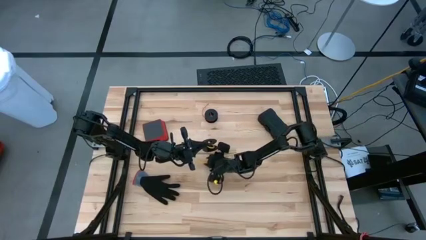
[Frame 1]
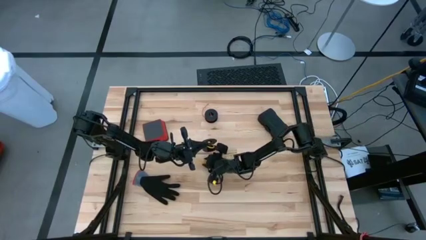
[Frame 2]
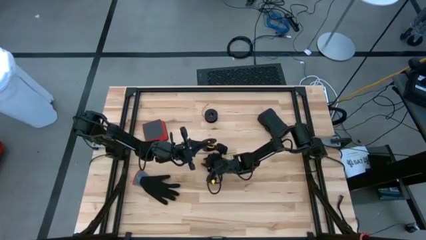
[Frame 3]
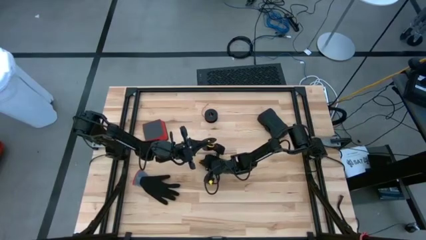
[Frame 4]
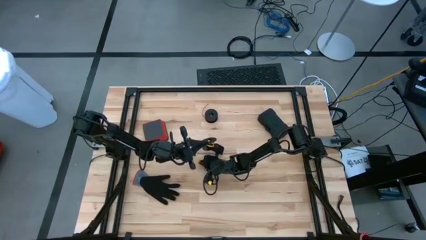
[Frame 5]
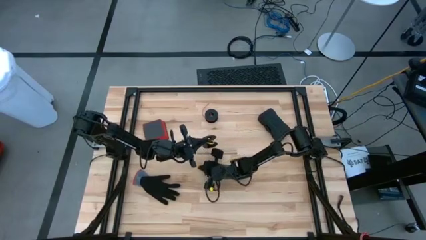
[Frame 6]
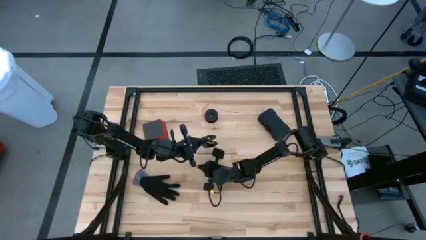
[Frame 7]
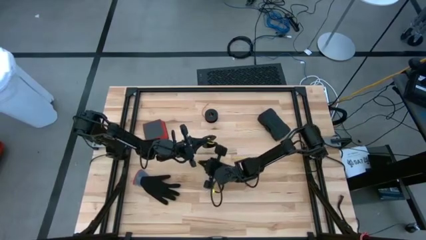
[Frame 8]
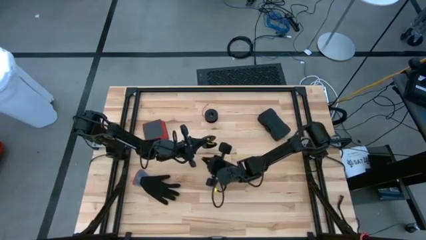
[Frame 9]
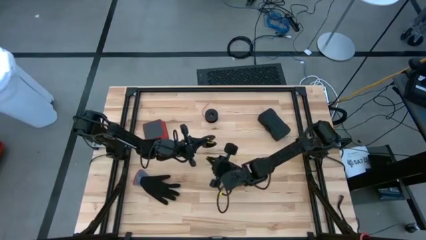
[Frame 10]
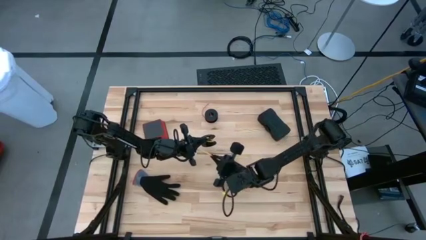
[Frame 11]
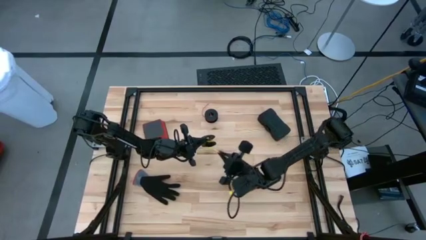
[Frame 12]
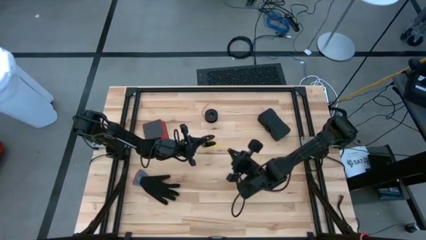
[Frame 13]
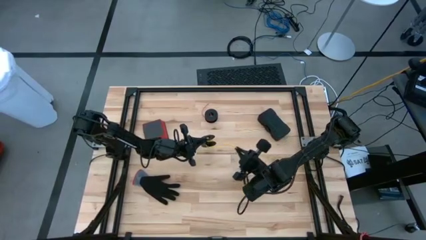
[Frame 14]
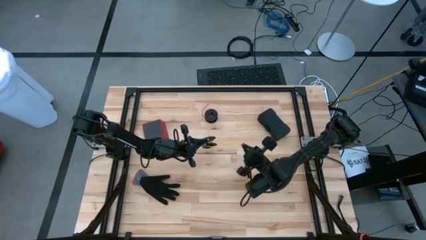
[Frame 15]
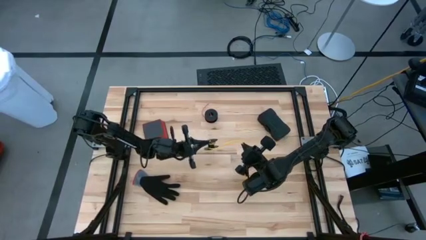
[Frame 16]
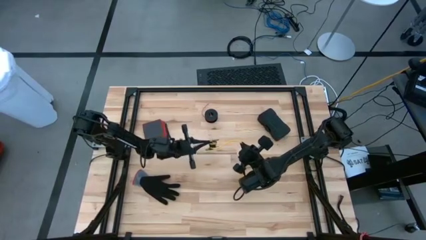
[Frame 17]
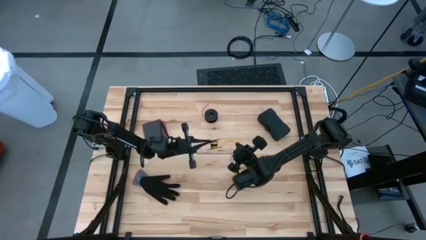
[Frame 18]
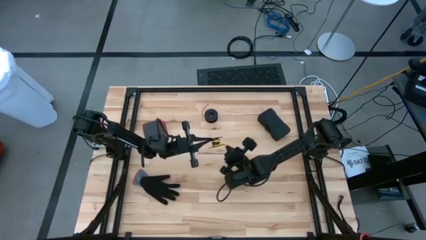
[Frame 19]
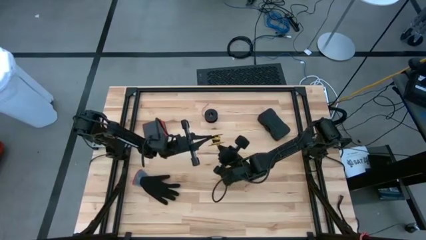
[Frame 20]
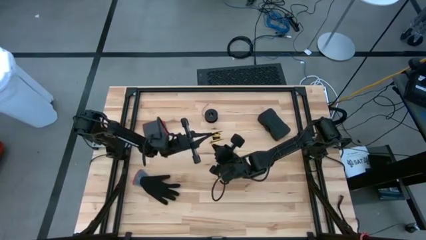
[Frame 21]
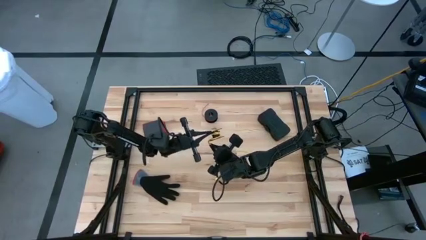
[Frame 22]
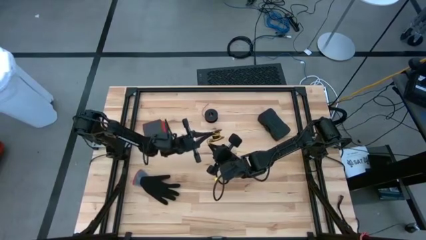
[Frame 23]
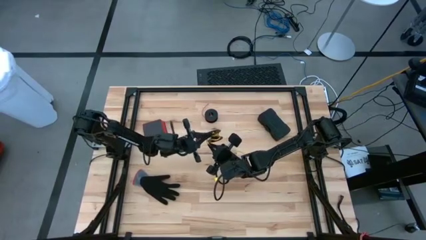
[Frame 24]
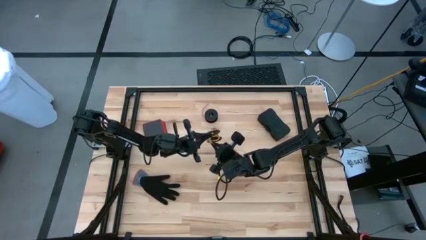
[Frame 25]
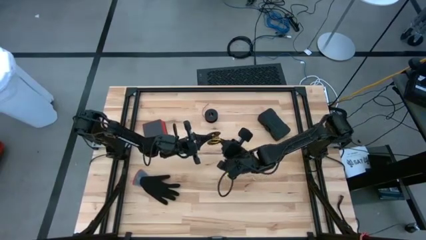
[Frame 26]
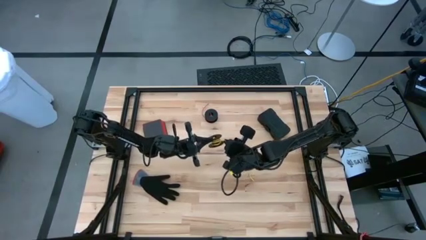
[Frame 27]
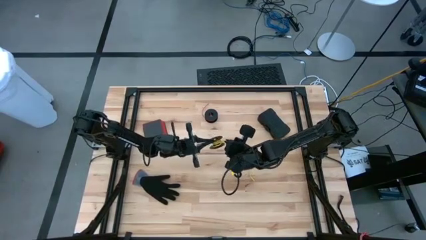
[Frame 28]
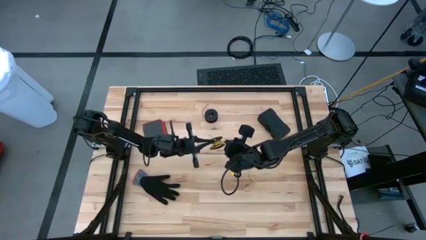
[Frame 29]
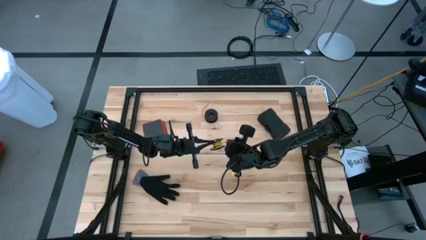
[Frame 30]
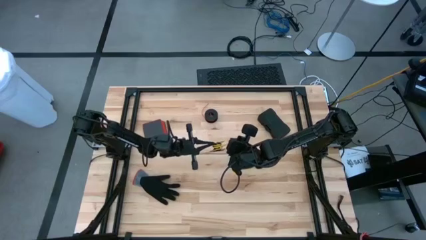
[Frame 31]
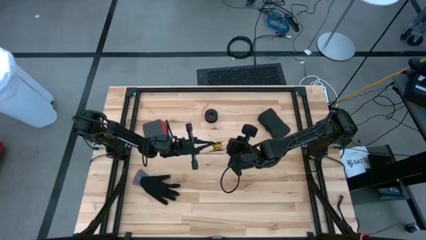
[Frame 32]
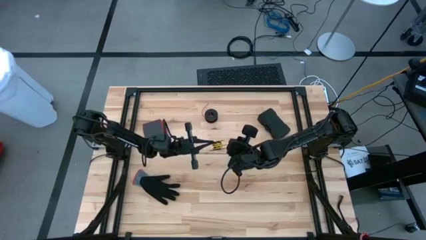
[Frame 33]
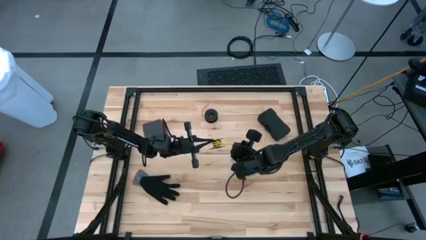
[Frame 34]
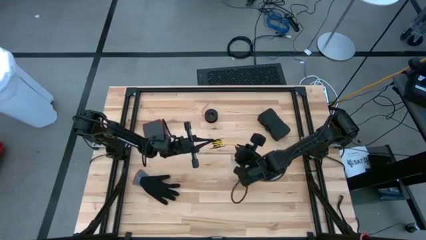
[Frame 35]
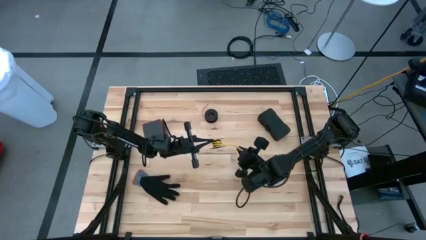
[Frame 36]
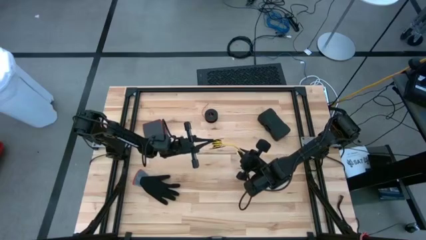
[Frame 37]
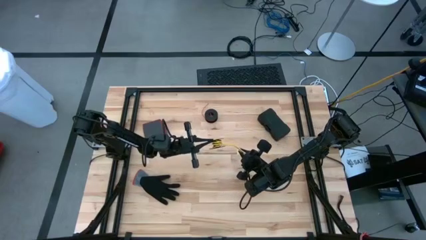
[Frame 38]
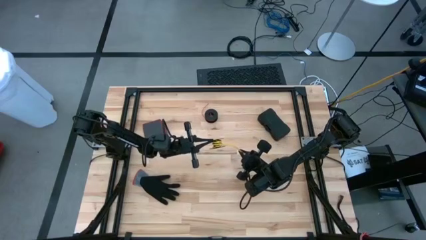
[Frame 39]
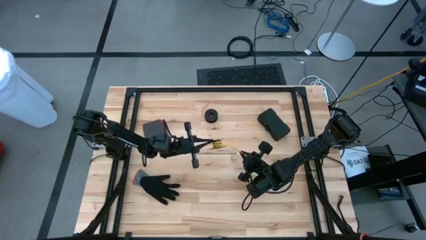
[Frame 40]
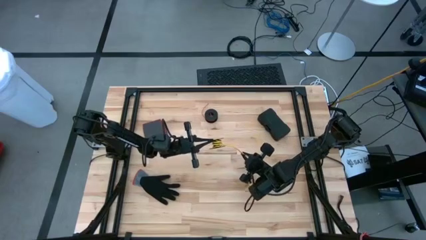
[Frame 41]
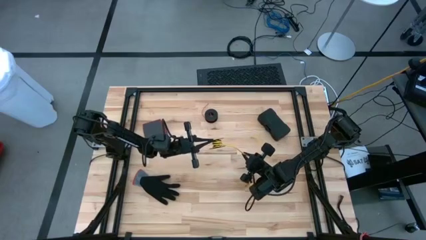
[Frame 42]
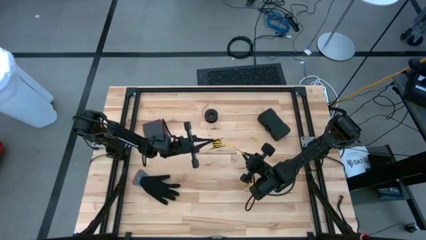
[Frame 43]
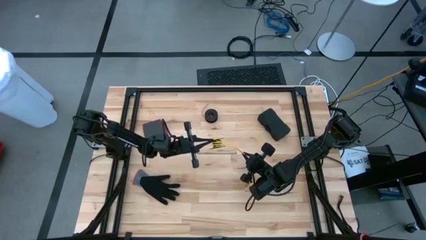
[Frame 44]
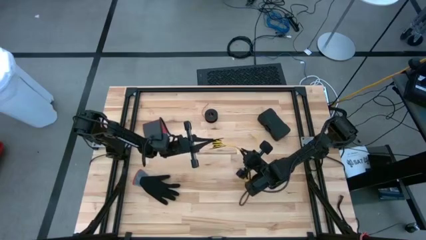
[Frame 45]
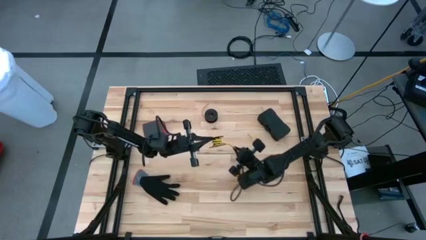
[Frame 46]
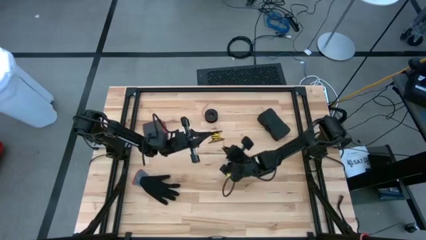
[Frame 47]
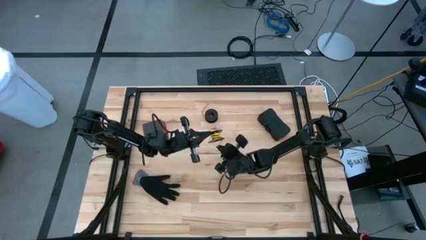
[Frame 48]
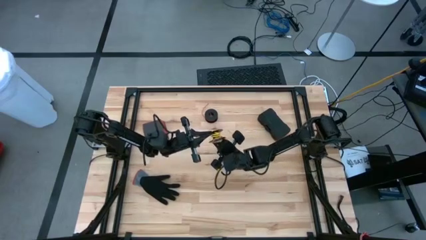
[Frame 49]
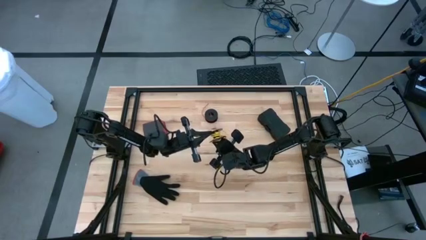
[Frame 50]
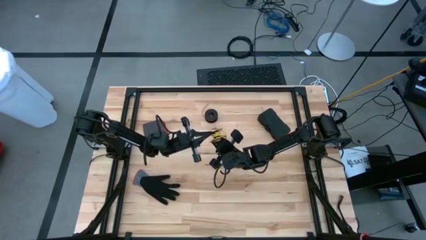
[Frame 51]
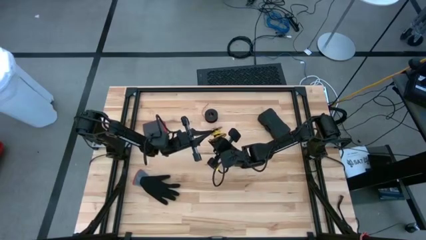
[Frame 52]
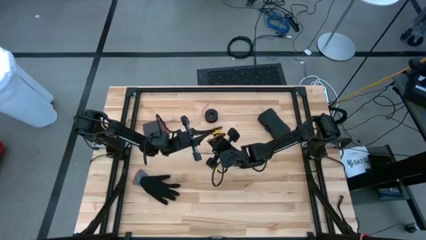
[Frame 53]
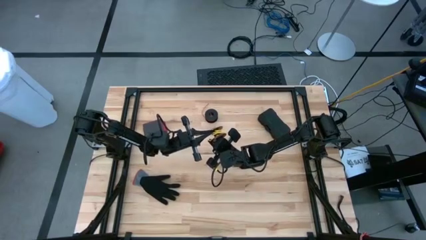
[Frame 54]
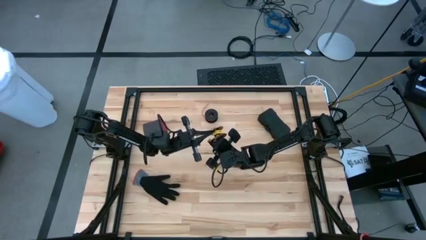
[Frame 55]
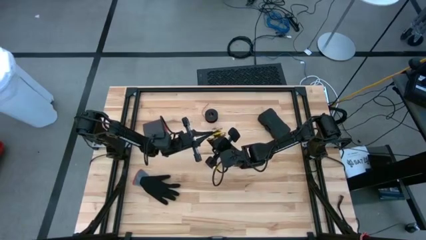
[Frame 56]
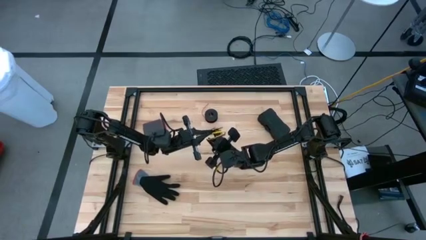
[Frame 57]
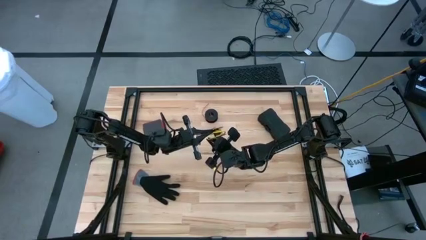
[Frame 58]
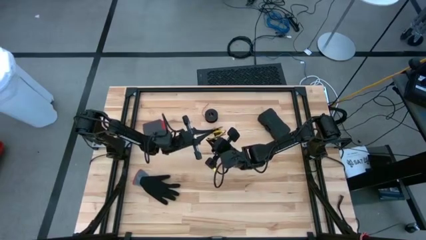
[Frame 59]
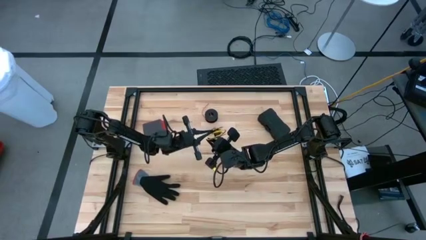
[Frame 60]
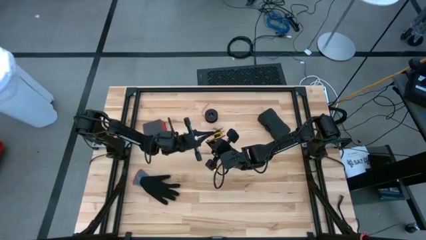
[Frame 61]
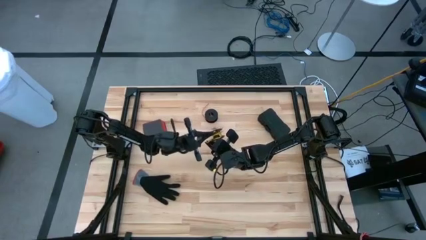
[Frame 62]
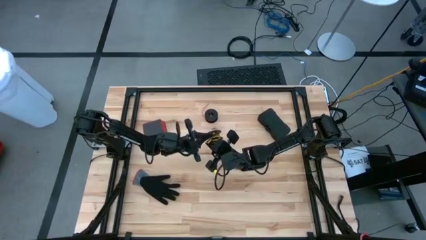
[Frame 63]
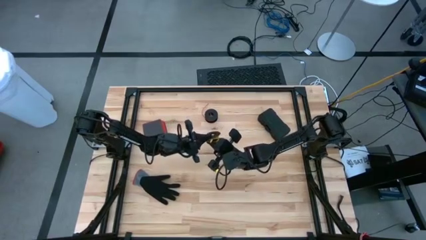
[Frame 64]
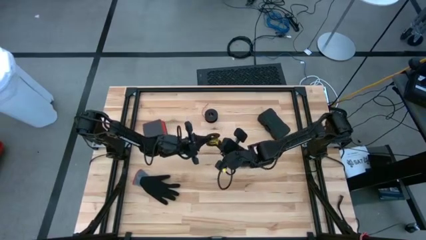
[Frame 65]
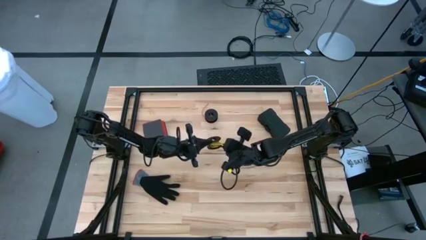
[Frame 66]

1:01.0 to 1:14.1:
Task: Coil cords
Coil the yellow wire into the spool

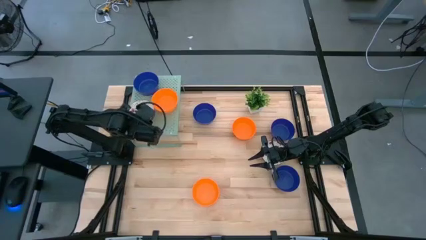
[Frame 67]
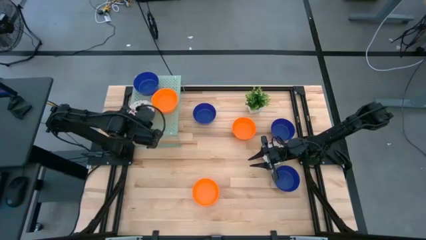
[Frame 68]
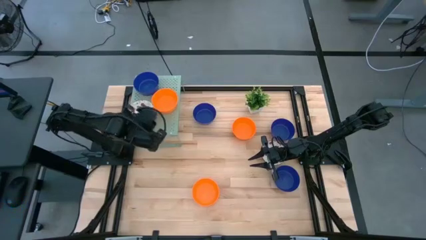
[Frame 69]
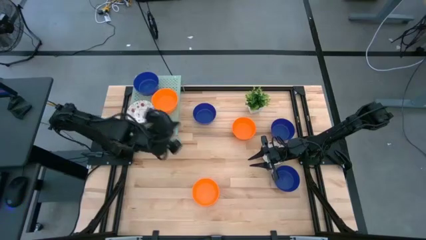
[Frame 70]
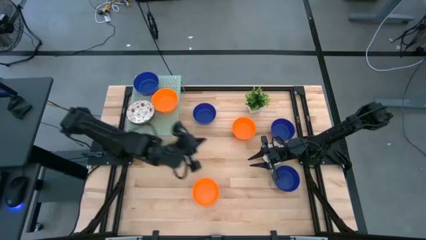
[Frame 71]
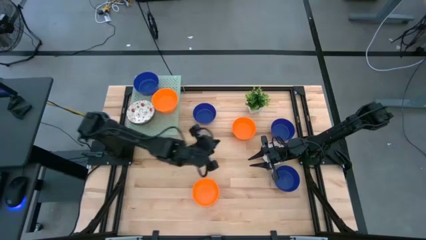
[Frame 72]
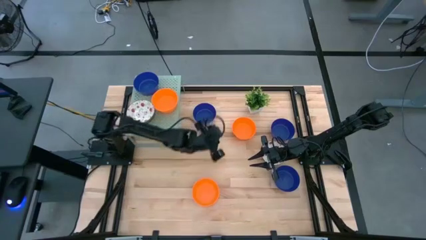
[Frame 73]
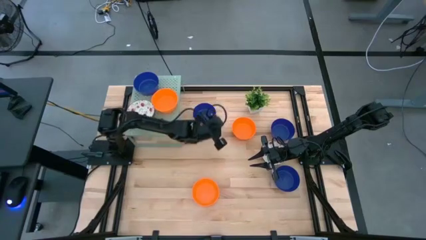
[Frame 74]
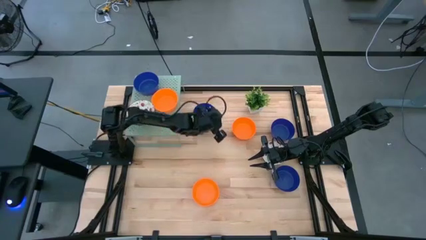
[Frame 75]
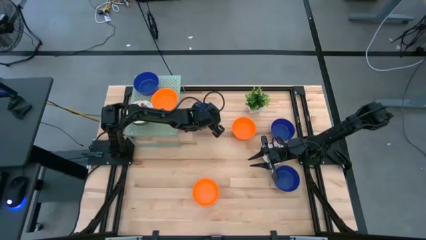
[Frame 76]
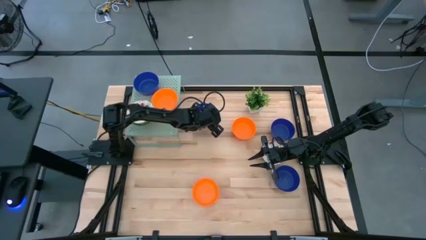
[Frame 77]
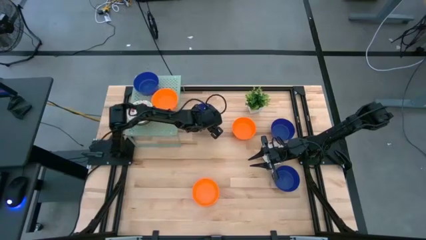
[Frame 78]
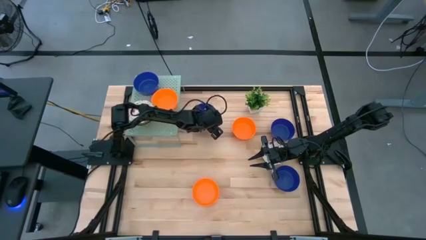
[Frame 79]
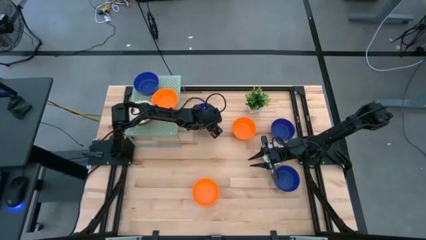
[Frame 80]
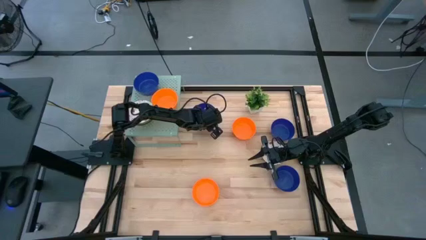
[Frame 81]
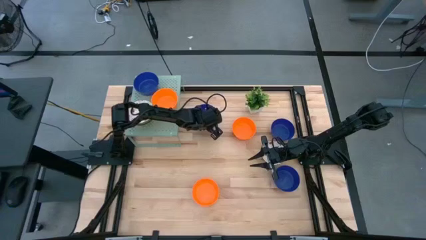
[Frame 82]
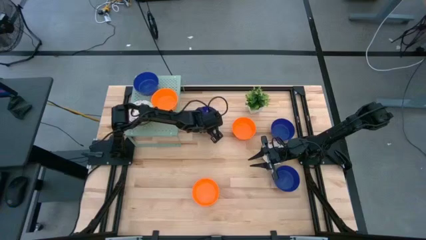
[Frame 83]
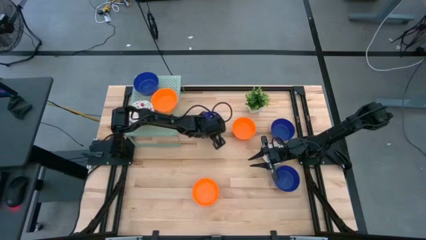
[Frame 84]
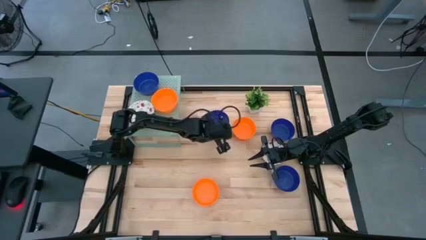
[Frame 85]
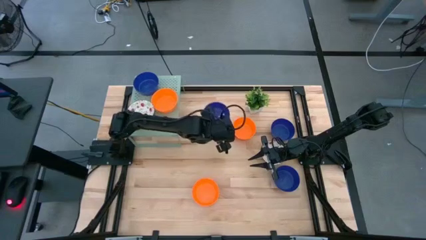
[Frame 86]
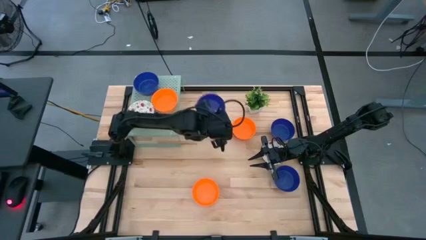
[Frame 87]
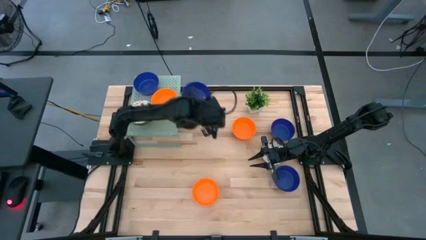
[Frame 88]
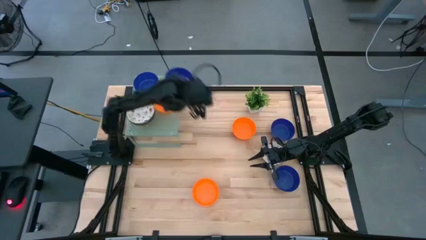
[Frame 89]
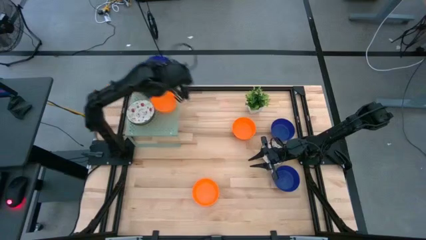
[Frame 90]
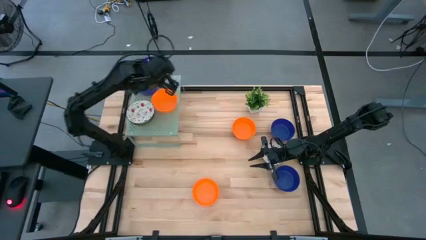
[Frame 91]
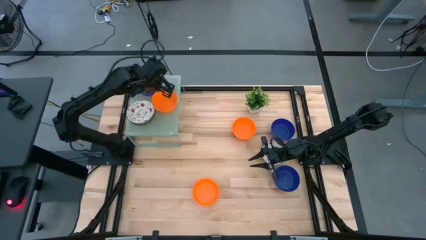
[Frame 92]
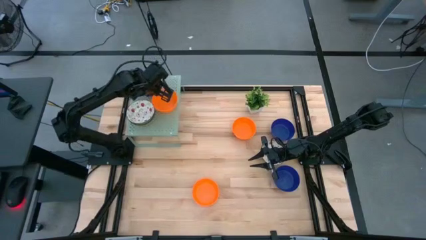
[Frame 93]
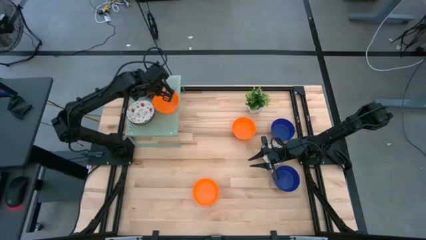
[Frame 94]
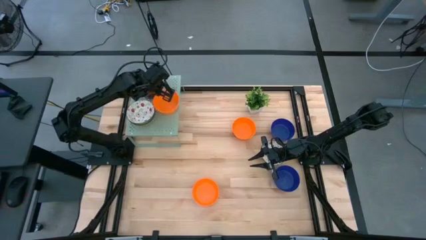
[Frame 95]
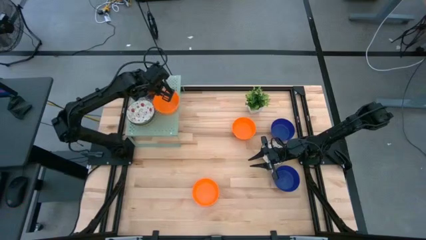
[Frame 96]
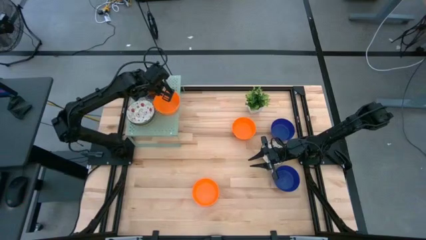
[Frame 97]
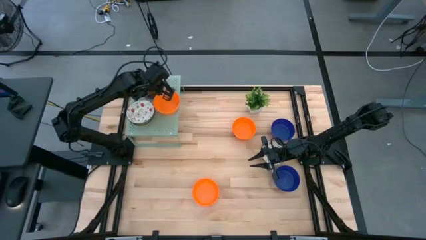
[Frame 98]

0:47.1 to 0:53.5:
Task: Pick & Place Mini bowls
Stack the blue bowl on the blue bowl on the shelf
